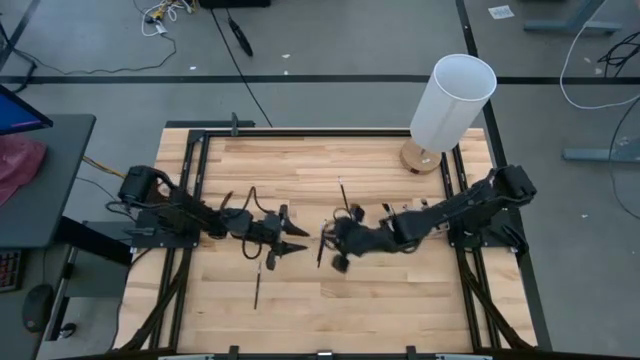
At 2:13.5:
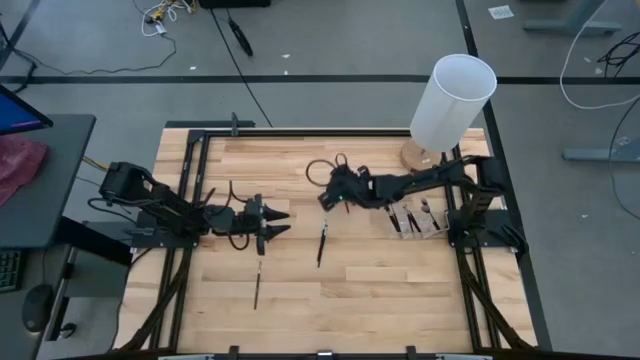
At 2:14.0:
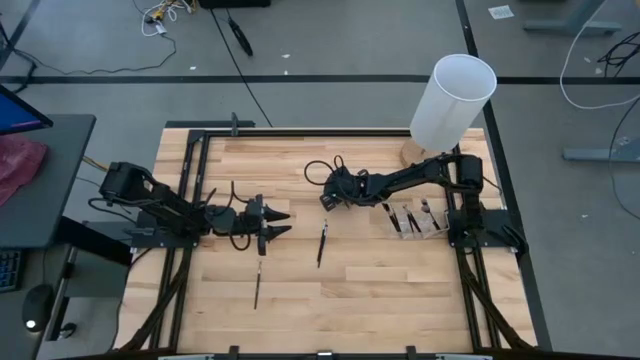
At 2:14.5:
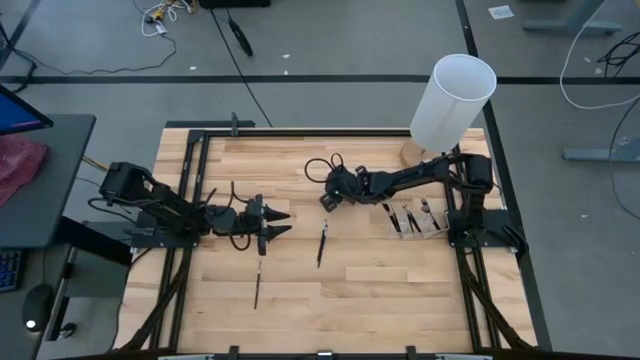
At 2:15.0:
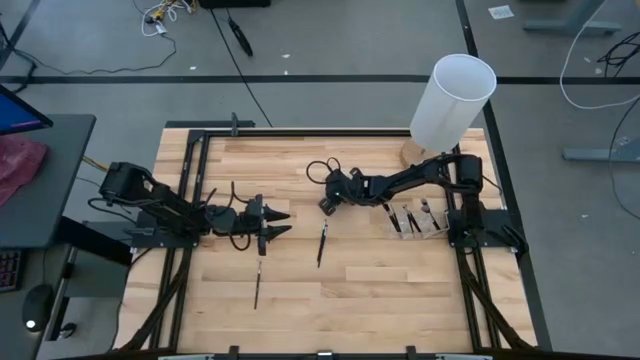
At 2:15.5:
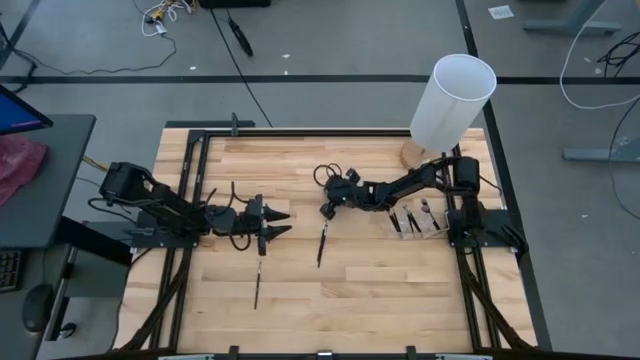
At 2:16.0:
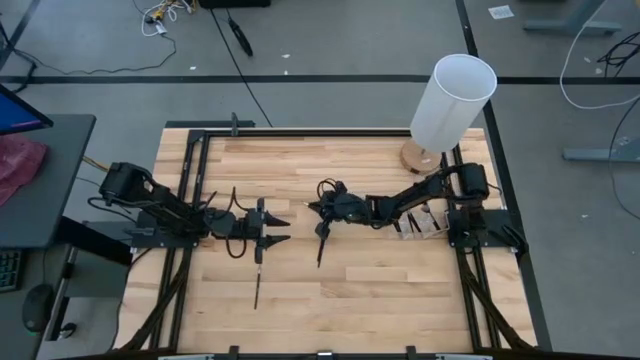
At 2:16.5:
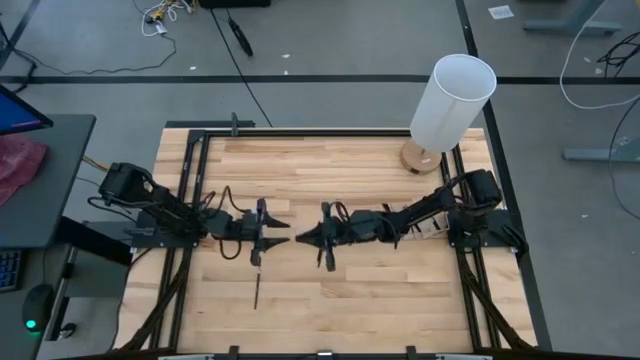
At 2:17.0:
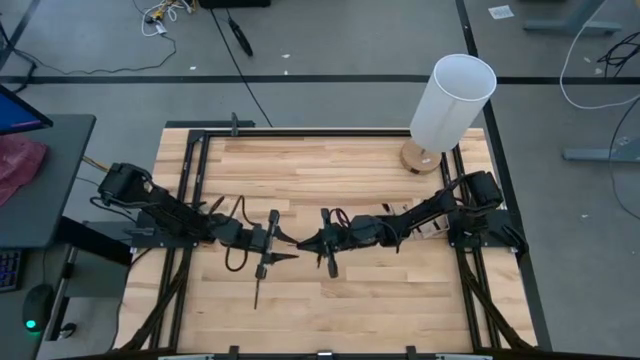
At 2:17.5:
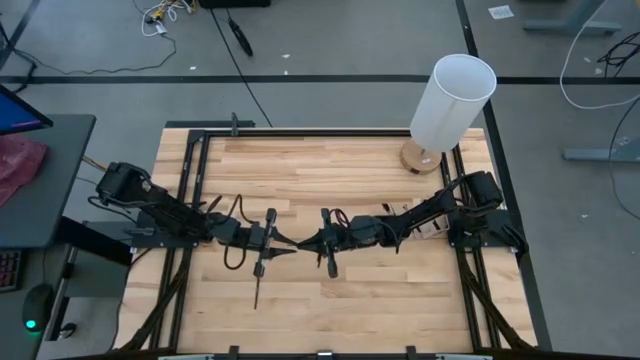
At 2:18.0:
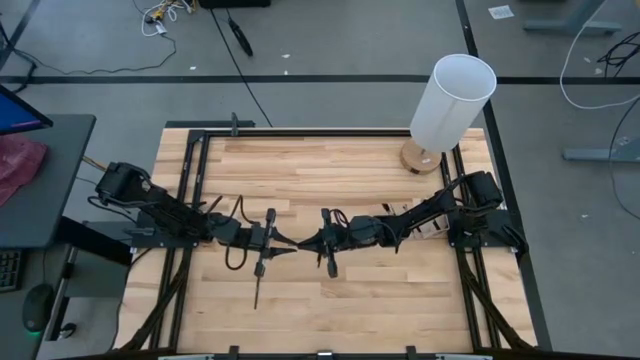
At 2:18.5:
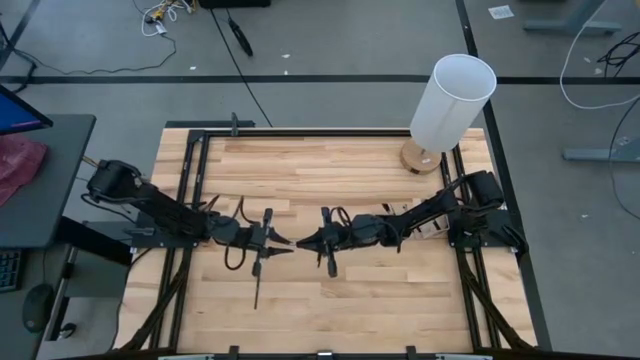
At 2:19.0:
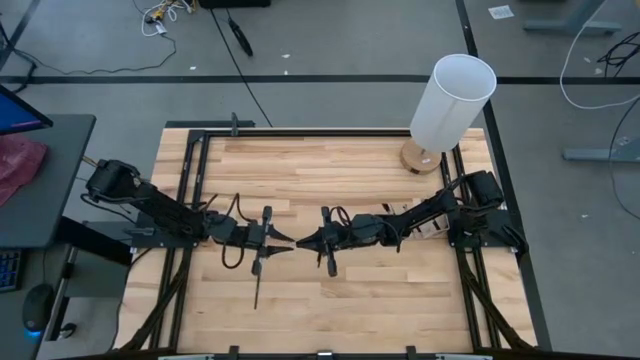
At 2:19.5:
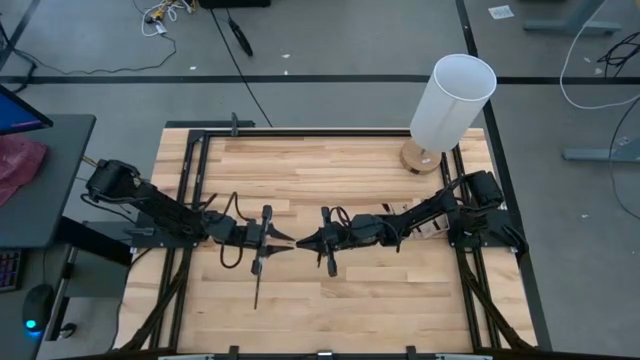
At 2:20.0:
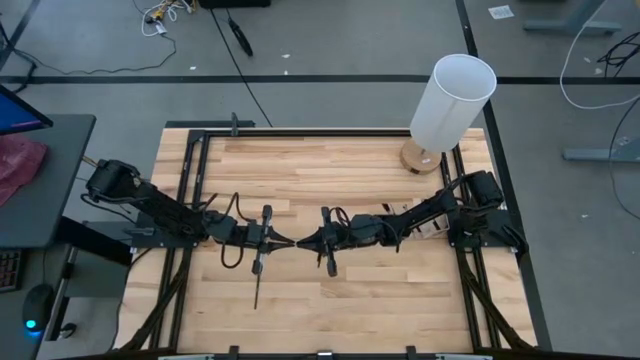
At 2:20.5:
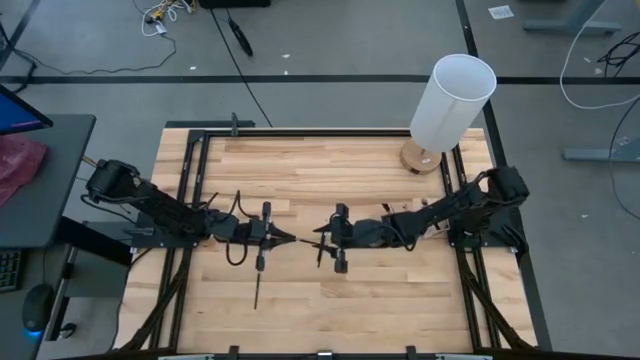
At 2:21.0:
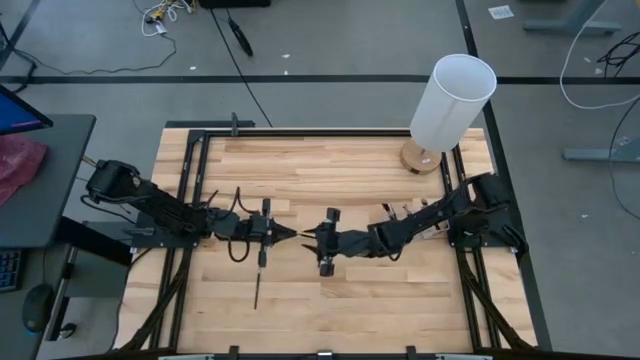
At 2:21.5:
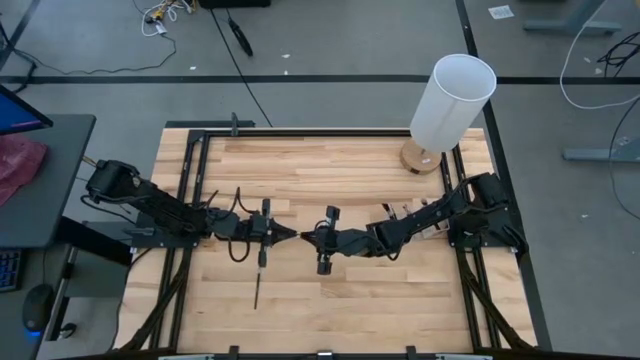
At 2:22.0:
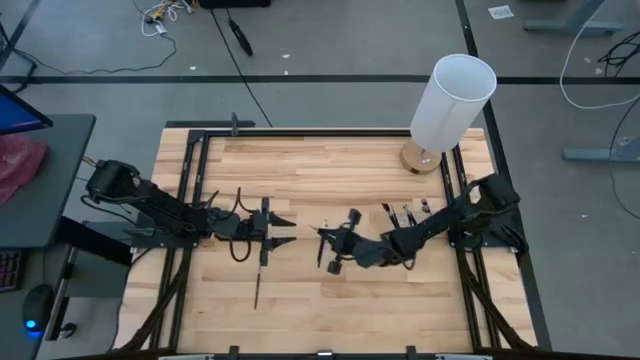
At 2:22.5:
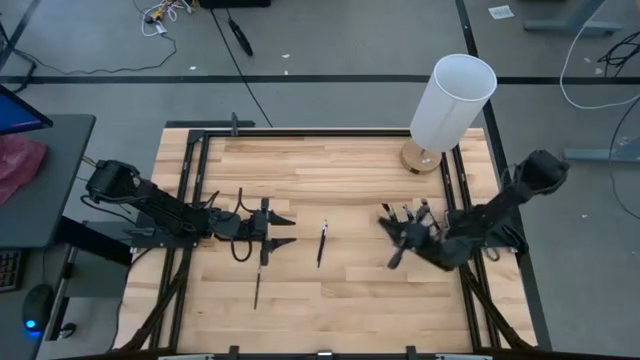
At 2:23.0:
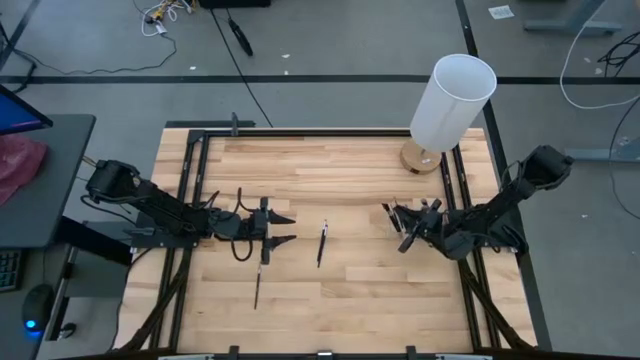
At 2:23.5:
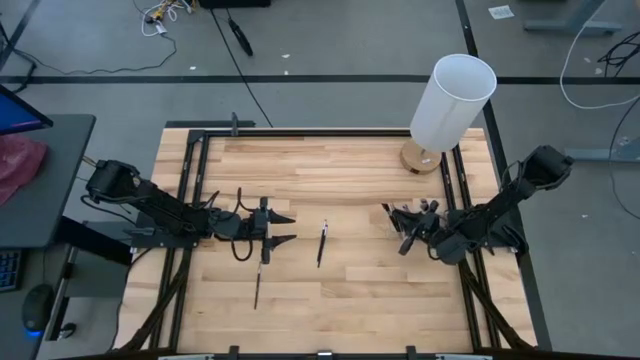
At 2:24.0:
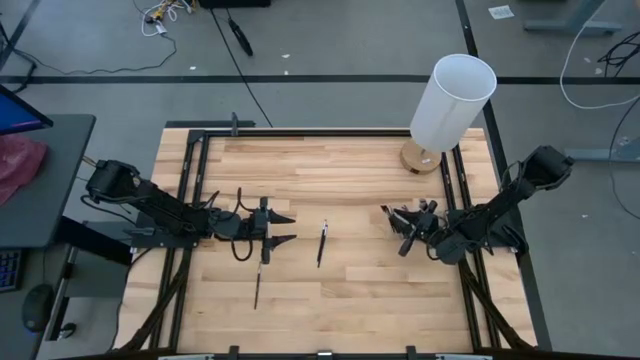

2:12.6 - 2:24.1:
Task: Put items in baskets/containers
Put the black eyeshadow brush into the transparent organizer

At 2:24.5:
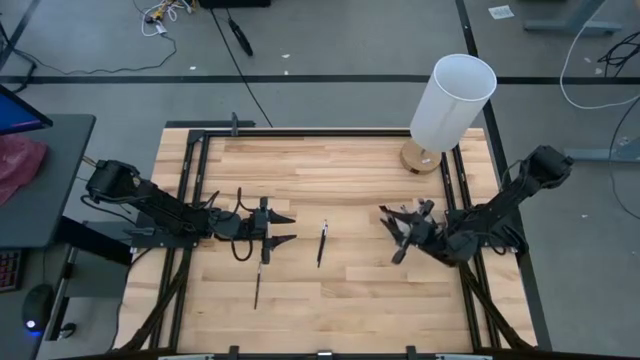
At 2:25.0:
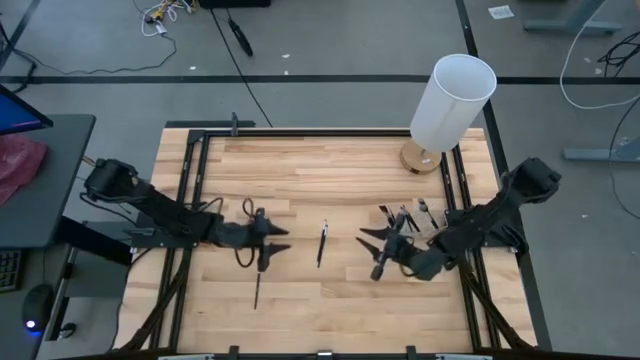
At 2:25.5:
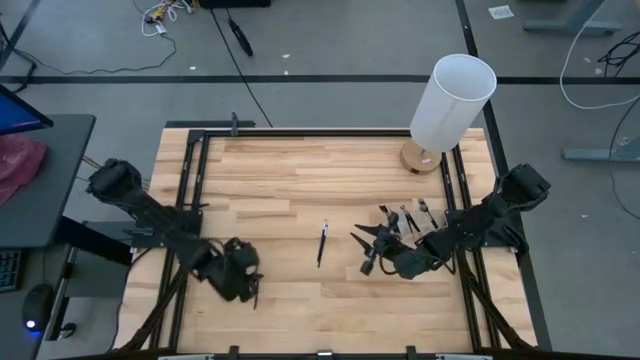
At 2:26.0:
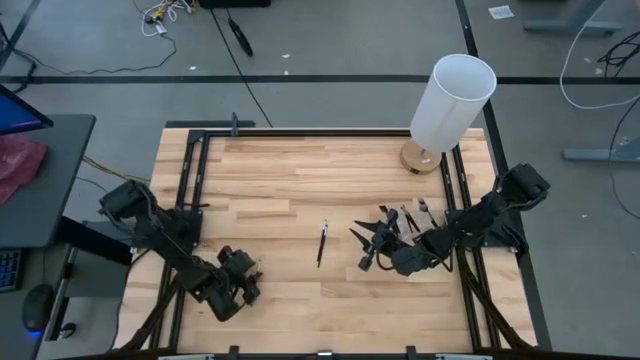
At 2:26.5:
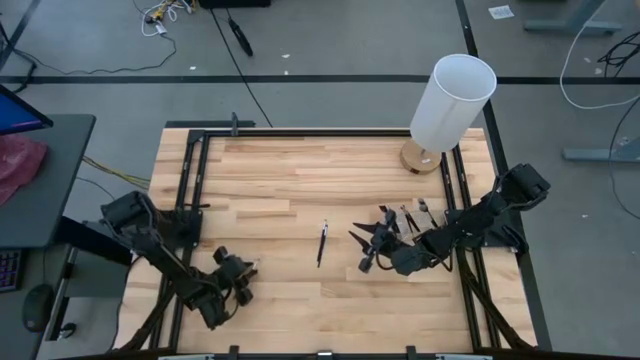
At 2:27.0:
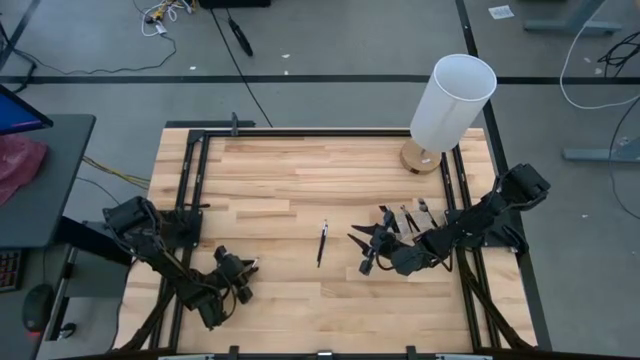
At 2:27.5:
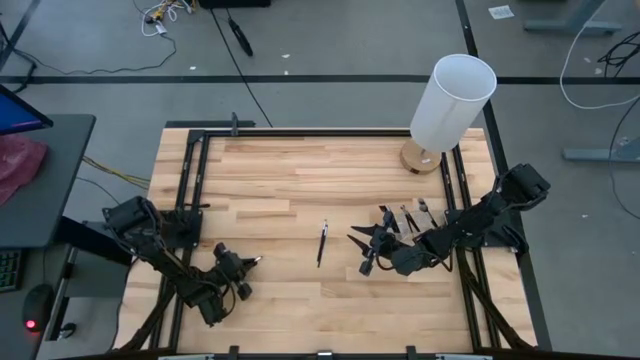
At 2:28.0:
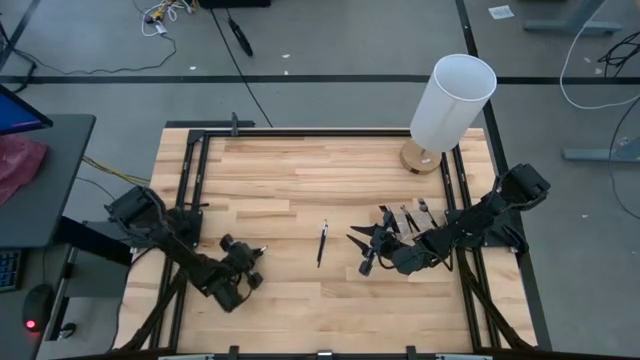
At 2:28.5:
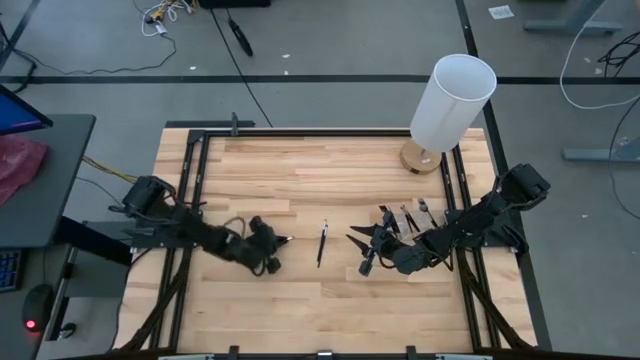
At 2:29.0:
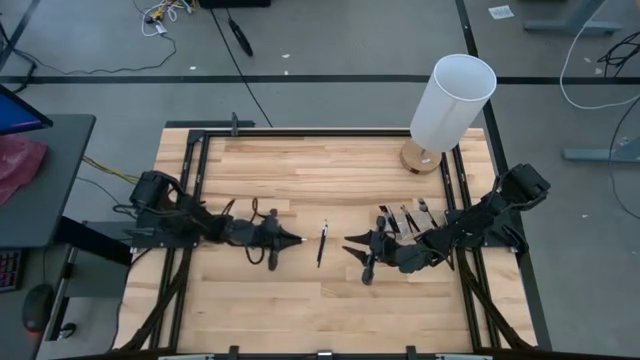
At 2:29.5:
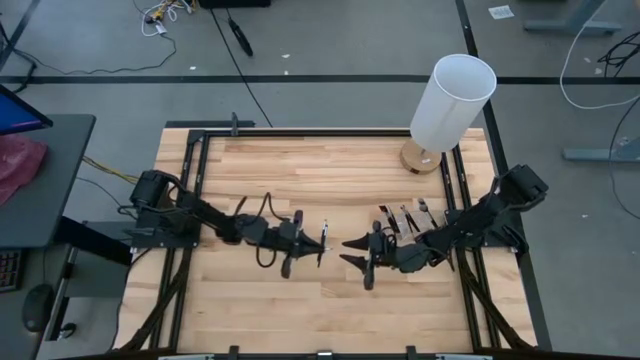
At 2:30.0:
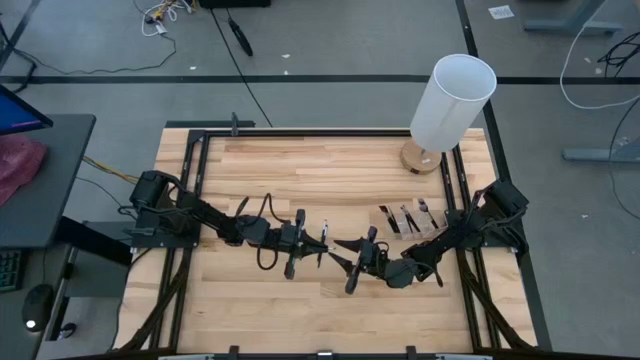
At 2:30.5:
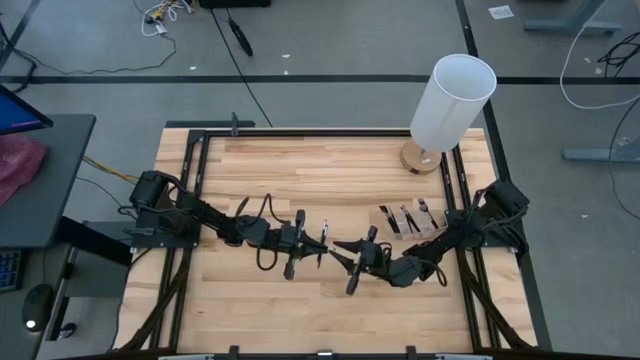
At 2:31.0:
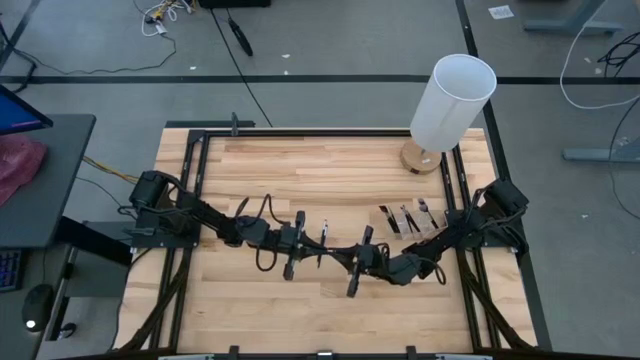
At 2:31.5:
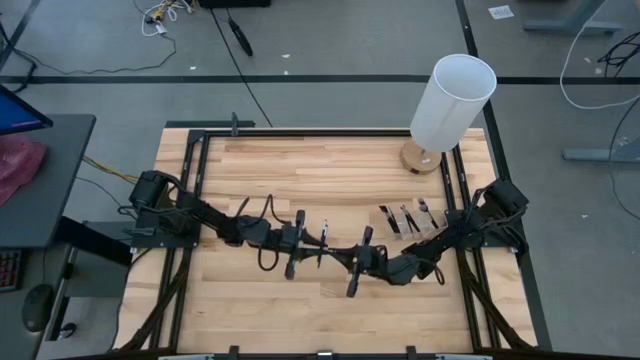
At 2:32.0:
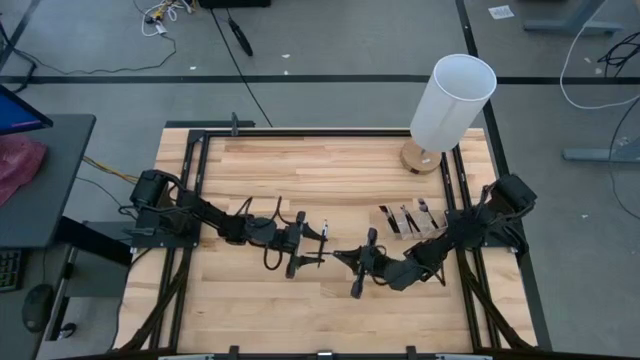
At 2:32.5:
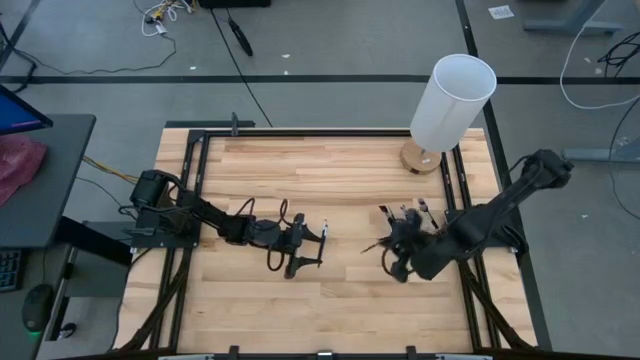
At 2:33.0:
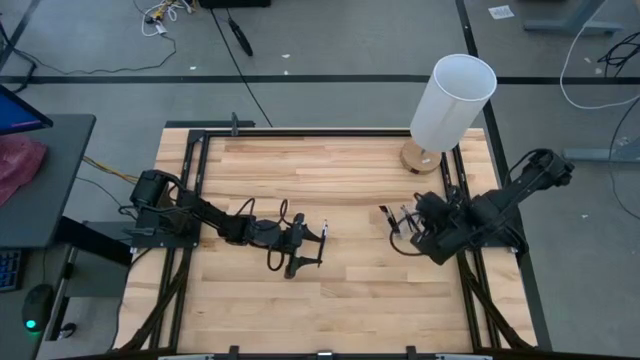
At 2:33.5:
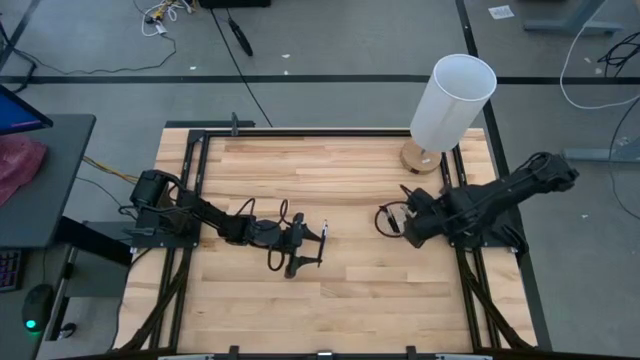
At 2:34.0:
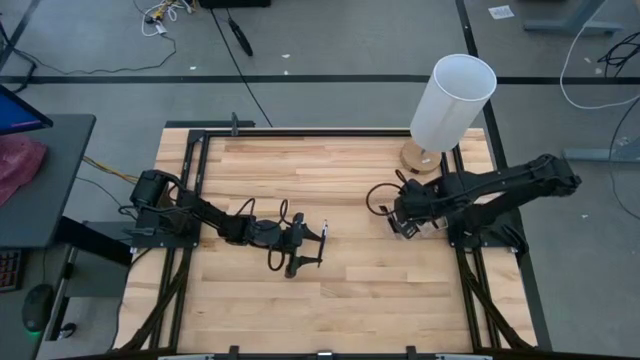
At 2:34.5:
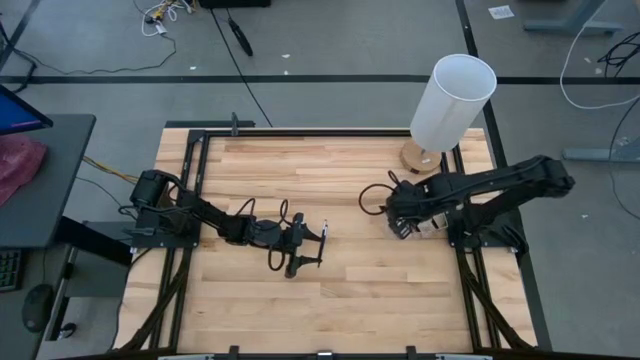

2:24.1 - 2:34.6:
Put the black eyeshadow brush into the transparent organizer
